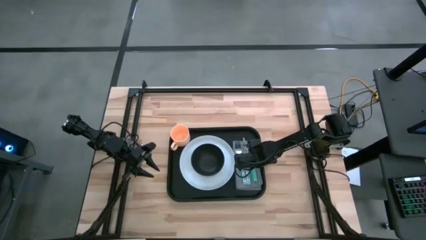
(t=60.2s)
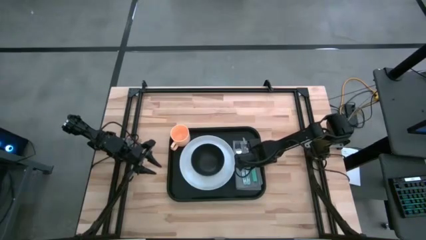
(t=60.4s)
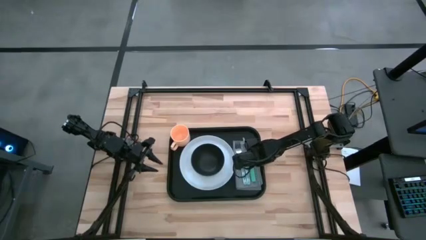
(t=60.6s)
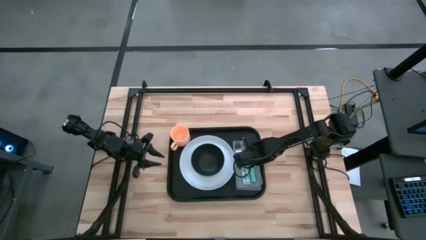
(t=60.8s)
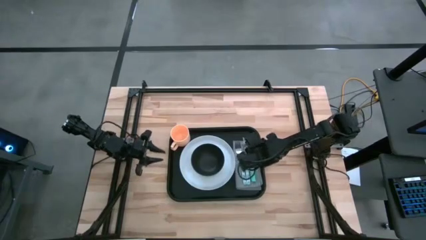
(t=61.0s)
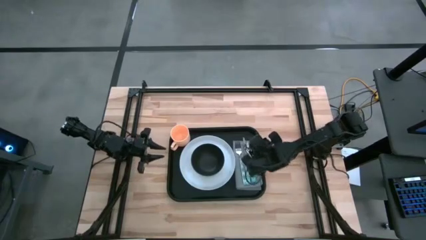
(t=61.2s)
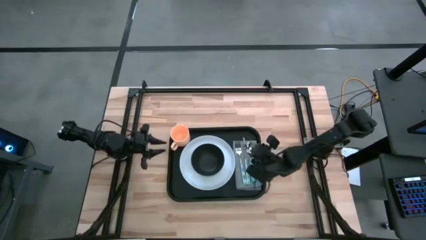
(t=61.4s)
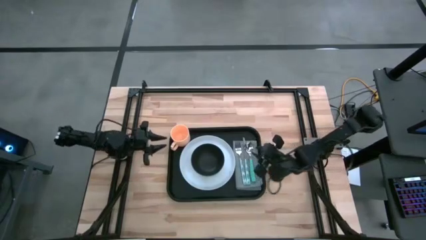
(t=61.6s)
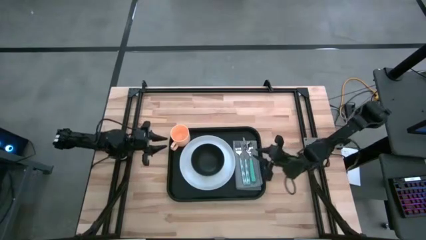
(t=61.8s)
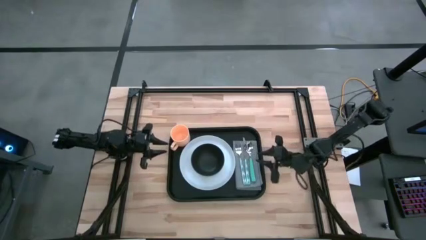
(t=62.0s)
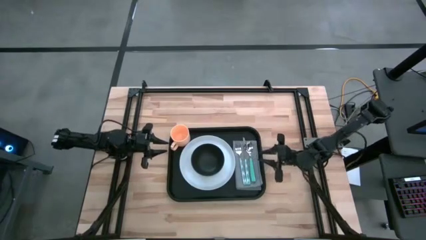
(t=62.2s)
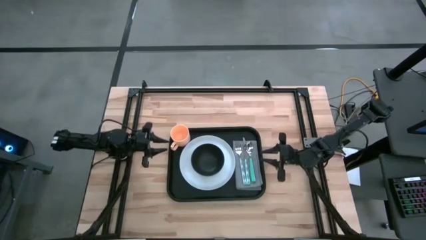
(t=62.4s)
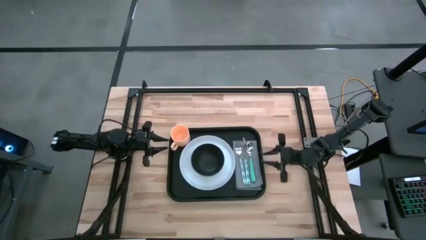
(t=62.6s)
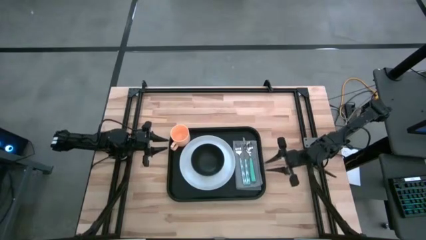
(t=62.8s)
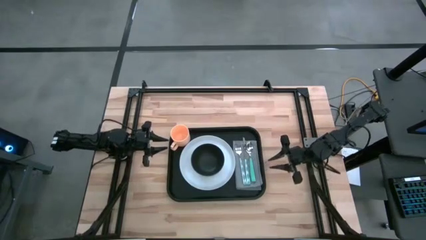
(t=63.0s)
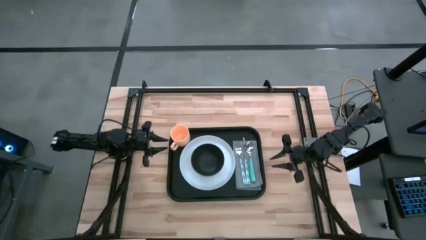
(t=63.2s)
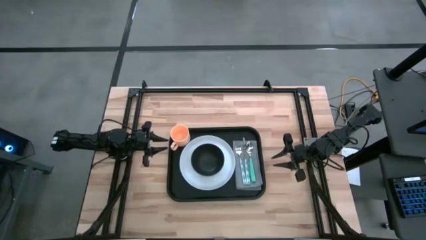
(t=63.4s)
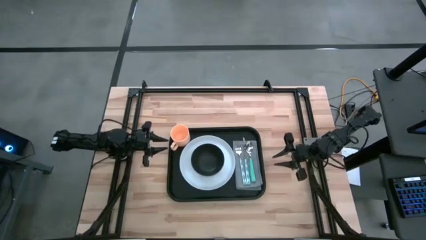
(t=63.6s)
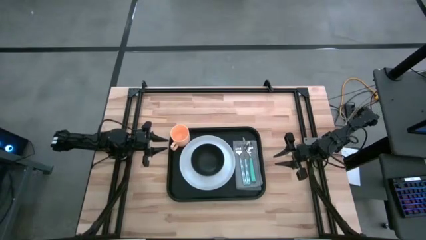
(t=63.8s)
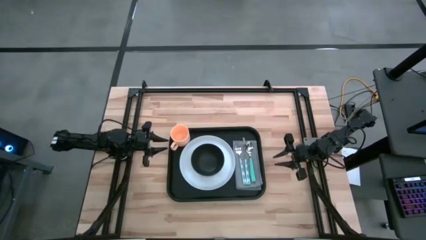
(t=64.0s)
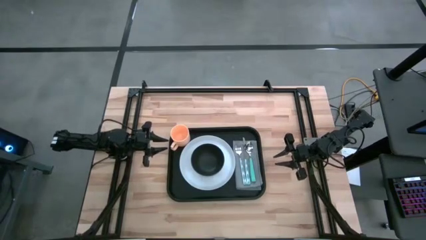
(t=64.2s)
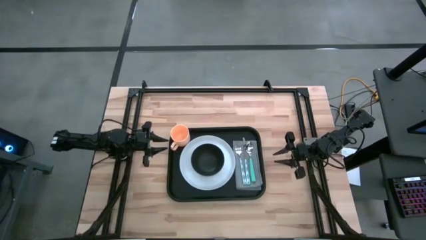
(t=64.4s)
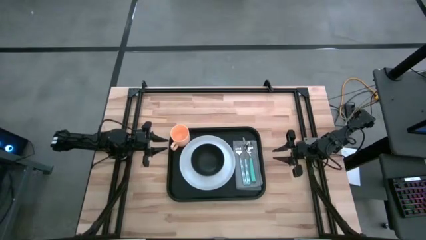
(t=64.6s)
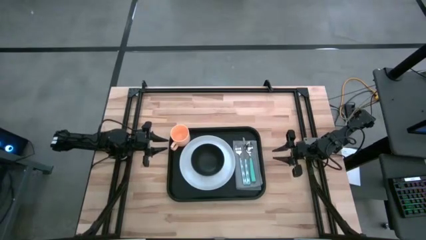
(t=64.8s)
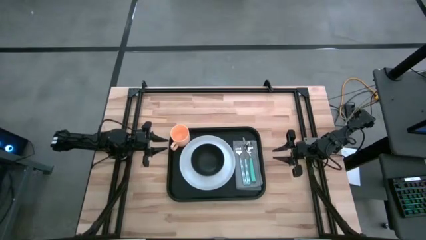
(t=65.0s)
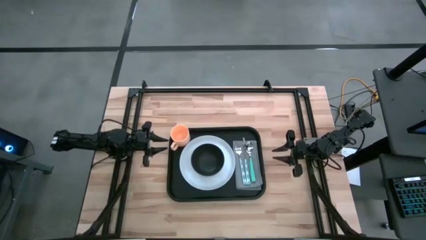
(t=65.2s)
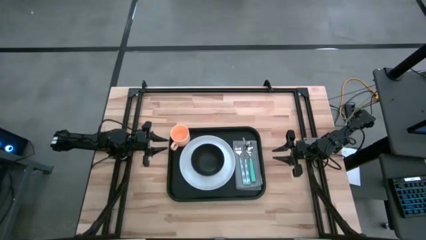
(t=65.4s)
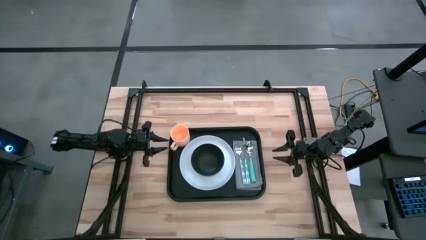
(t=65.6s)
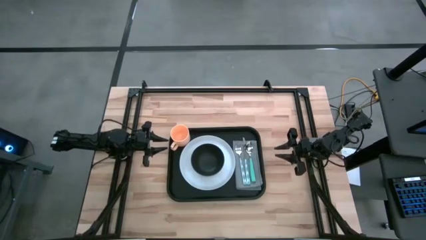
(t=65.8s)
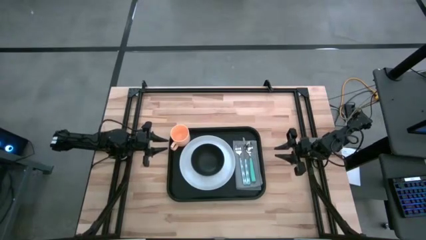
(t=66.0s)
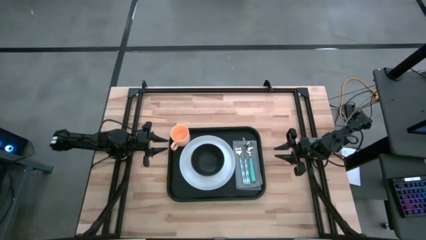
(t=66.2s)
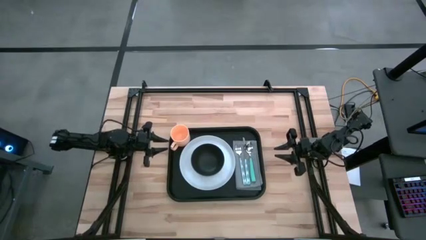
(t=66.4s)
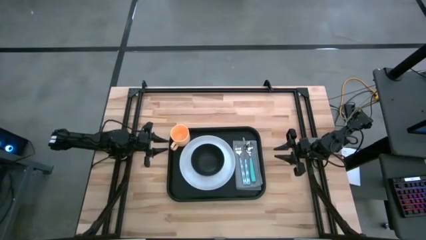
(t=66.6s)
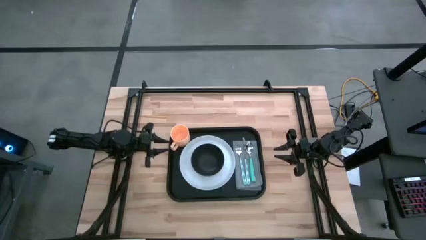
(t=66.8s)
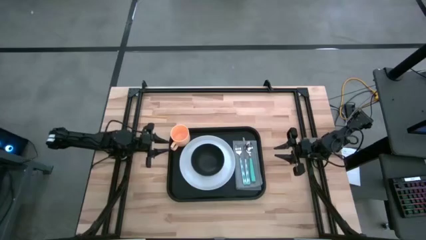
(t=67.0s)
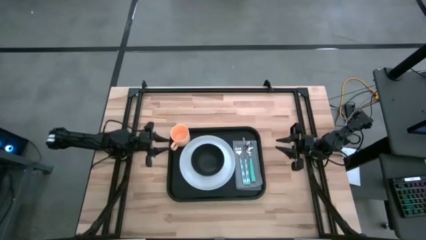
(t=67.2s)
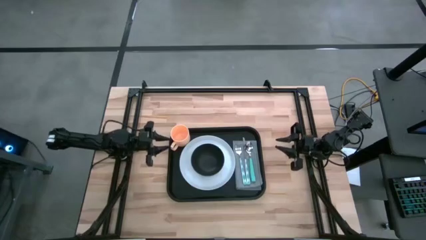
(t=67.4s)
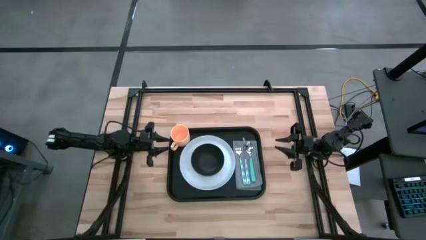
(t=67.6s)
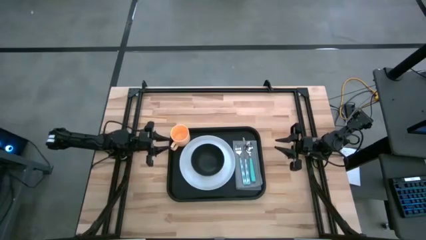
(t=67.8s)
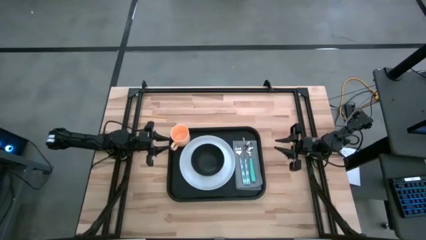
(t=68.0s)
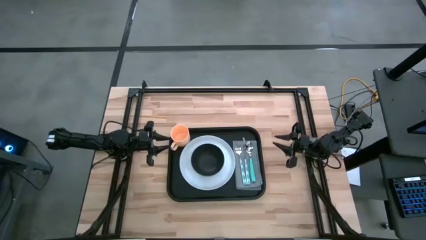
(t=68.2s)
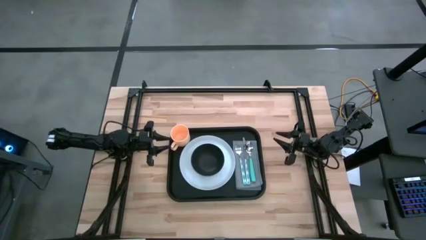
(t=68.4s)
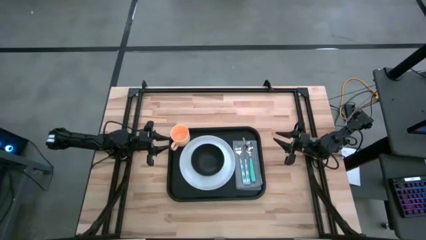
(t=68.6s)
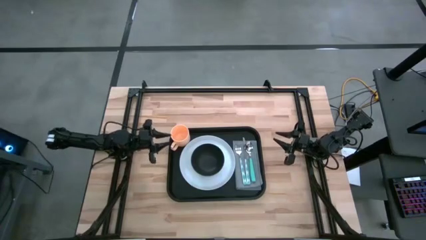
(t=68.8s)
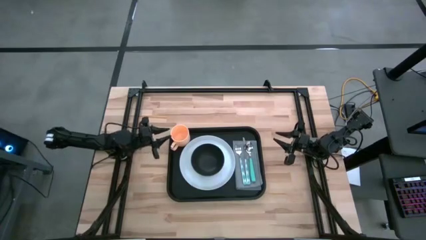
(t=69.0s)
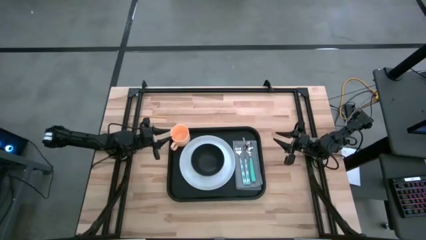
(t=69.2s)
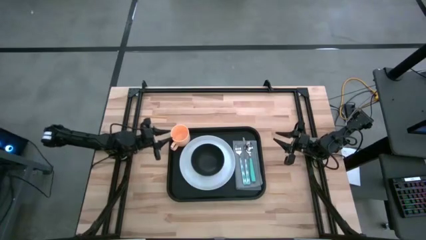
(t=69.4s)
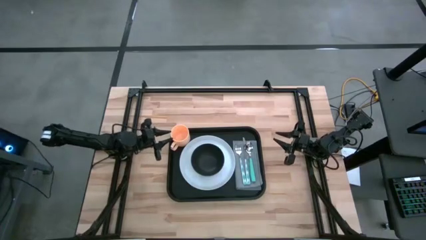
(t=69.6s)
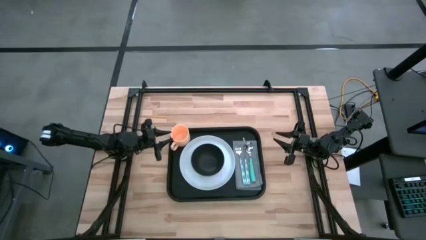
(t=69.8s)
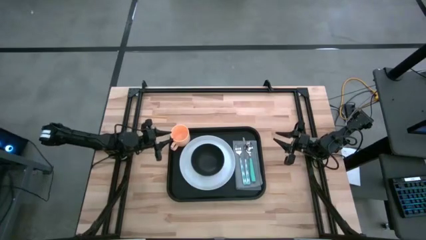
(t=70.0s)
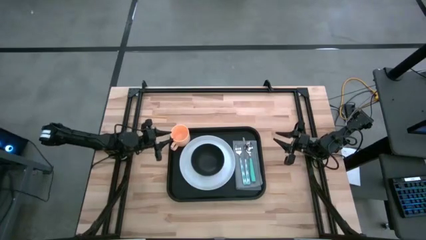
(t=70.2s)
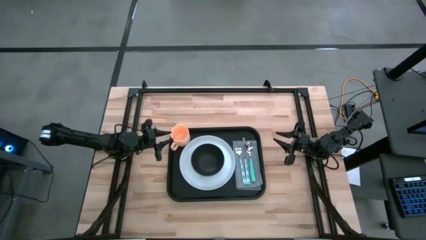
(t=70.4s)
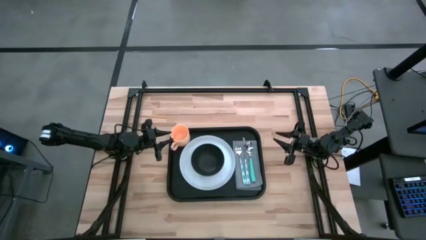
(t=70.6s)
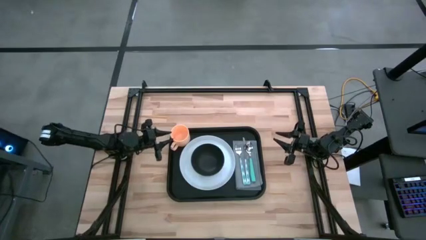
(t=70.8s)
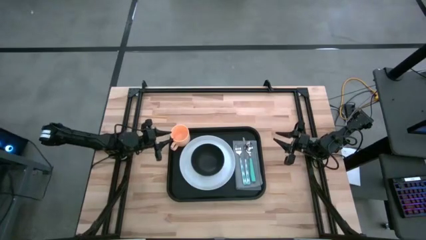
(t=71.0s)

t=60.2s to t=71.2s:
Task: Set up tray
Return to Home Position
